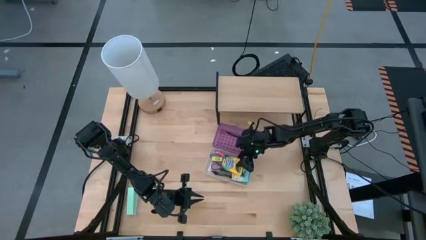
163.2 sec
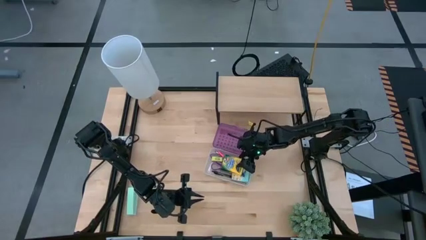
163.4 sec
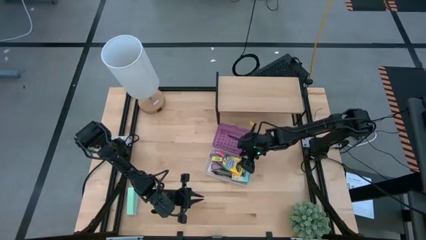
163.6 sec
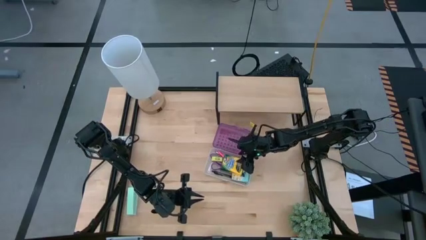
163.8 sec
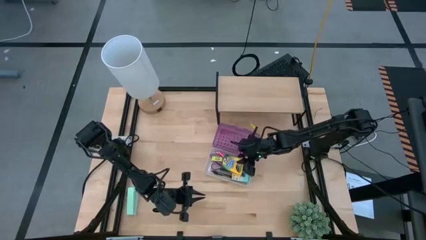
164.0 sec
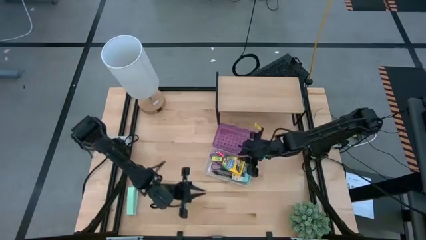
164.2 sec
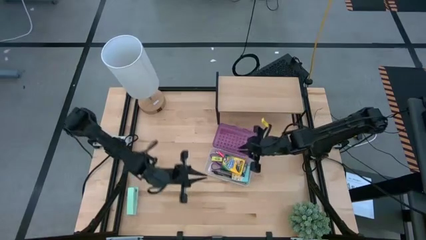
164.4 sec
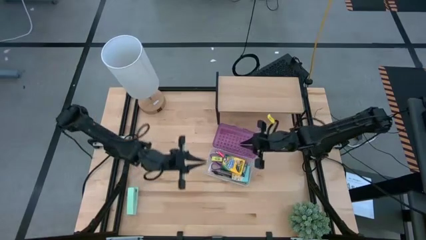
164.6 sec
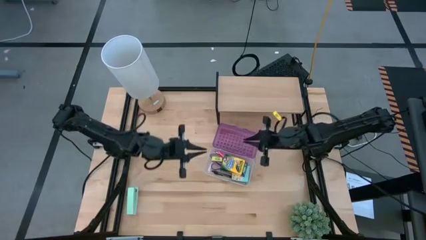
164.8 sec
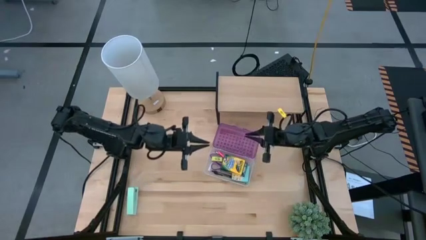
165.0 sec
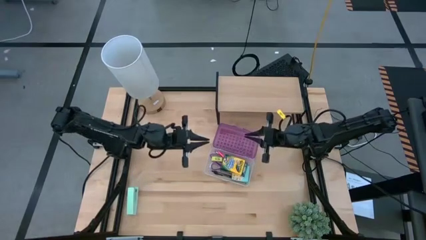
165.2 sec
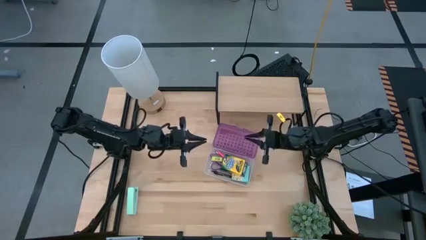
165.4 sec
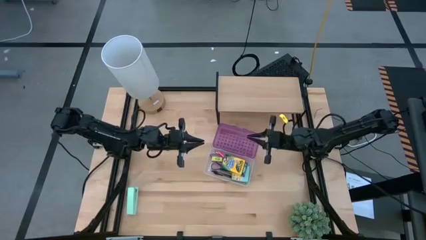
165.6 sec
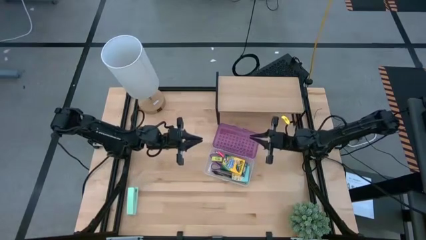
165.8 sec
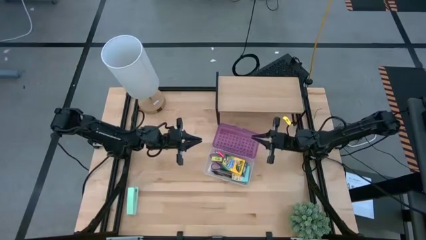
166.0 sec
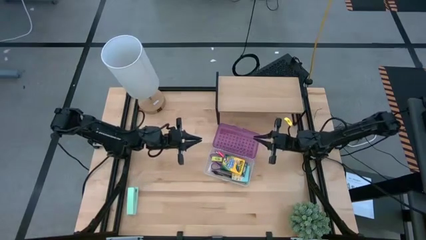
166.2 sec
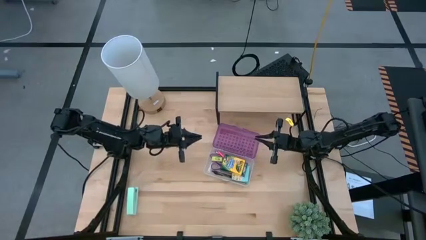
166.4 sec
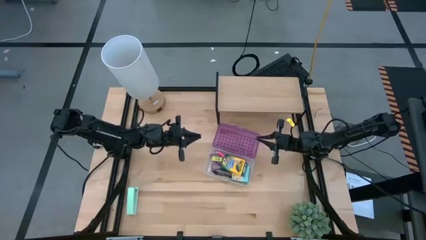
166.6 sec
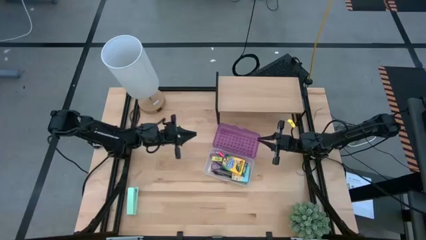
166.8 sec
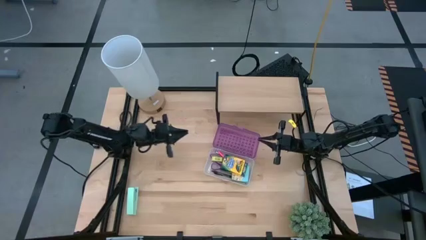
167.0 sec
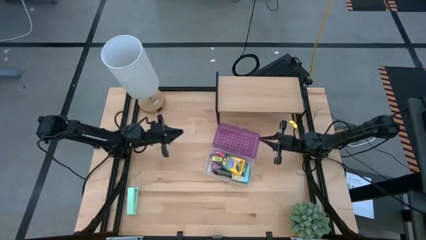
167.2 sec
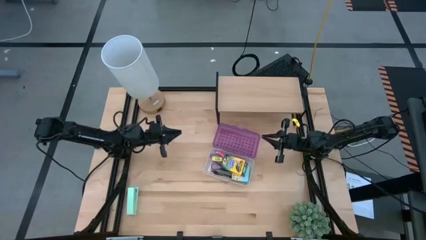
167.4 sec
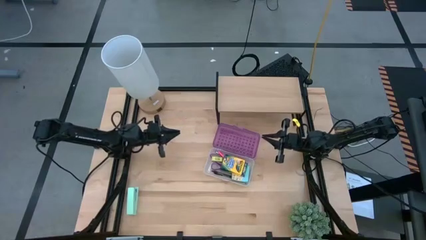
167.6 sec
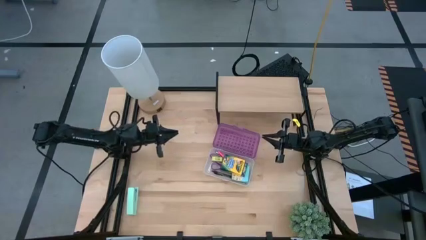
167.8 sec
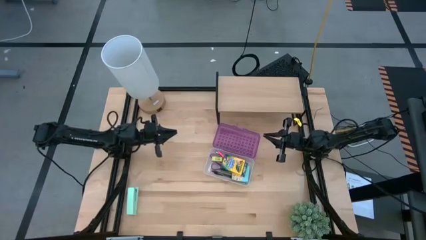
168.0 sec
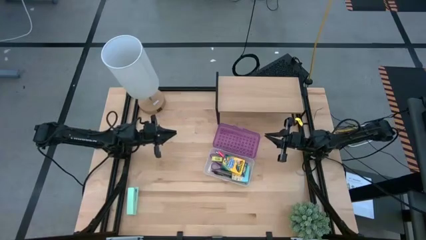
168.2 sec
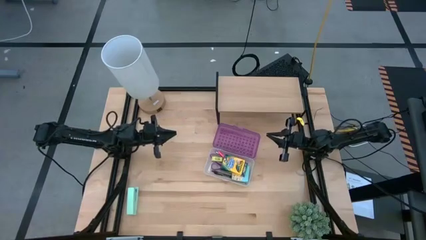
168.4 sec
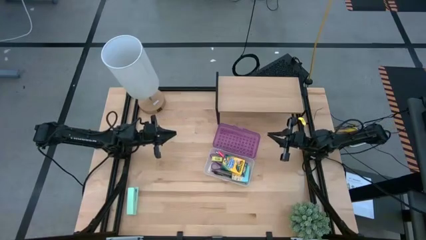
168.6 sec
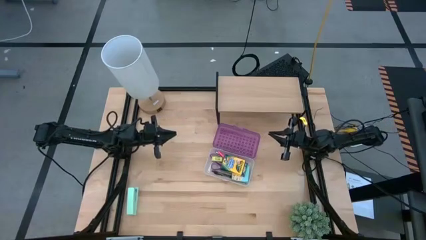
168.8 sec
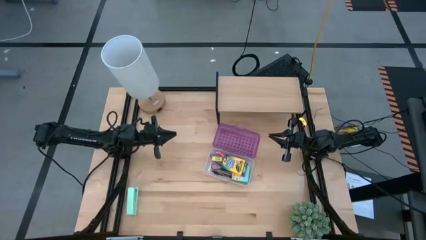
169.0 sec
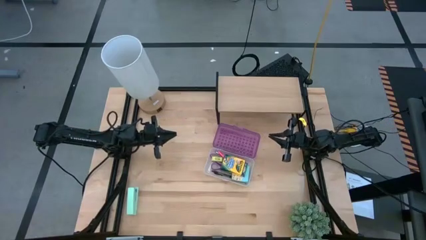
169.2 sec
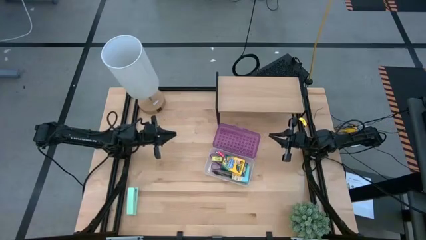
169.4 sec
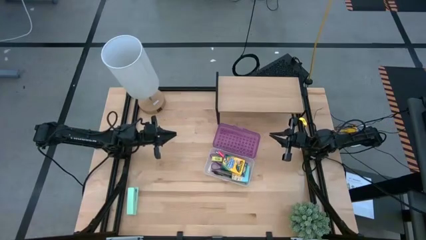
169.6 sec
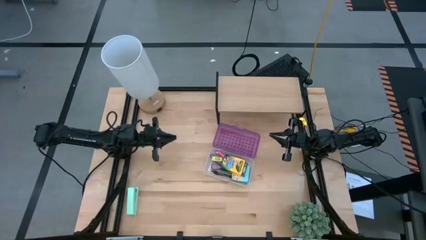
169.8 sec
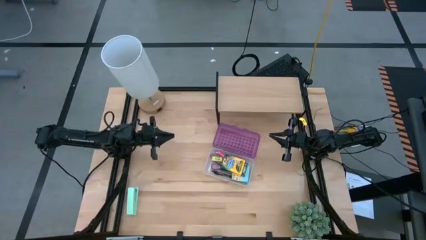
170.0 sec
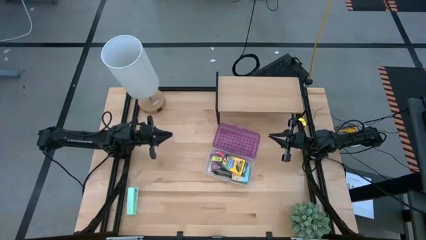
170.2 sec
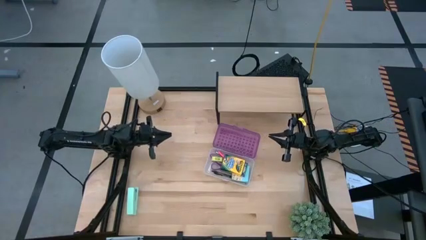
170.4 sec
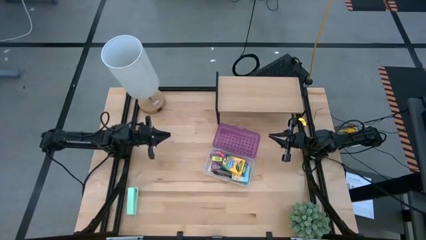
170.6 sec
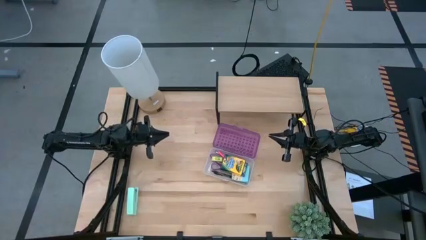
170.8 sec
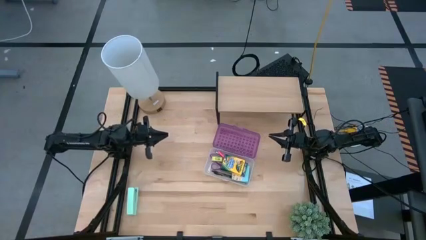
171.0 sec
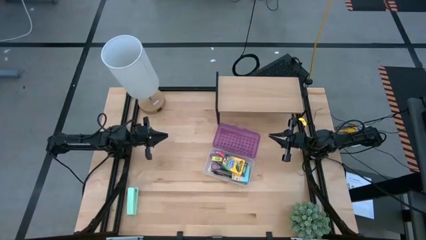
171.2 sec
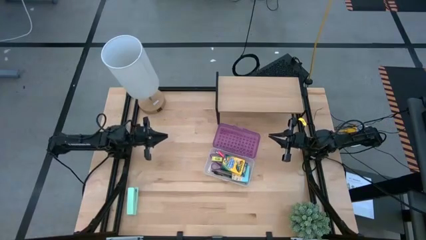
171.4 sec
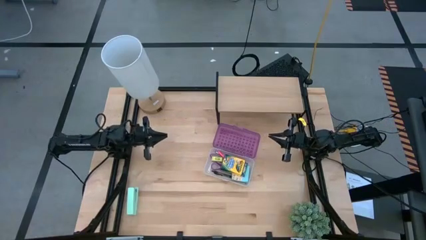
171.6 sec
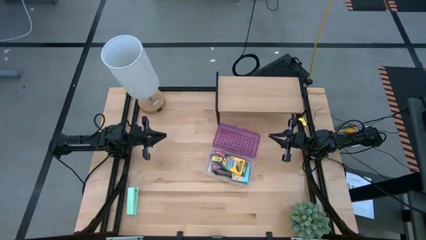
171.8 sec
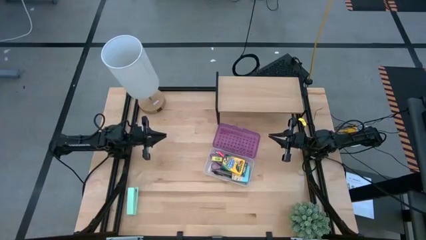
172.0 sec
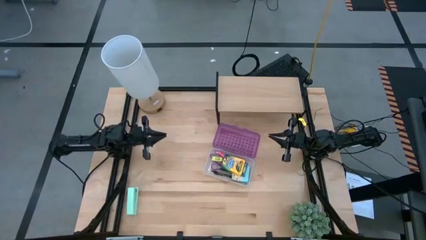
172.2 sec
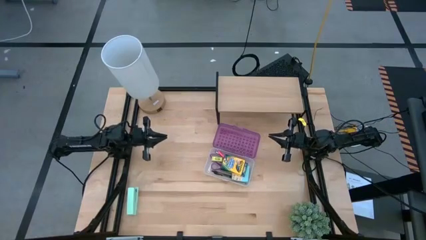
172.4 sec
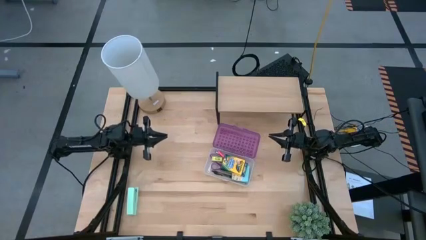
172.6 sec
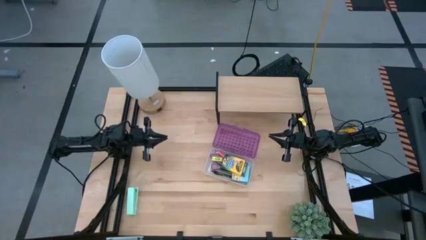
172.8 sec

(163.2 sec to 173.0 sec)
Task: Pack school essentials
Return to Home Position

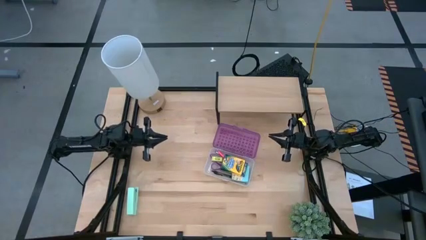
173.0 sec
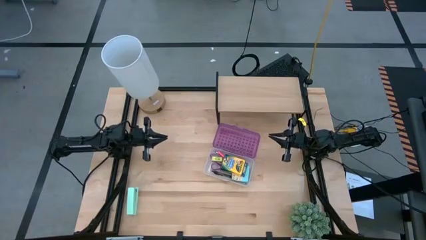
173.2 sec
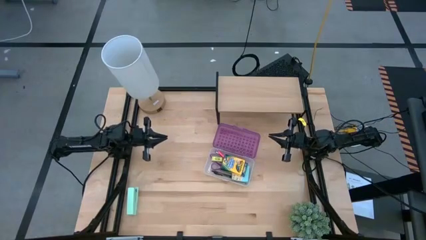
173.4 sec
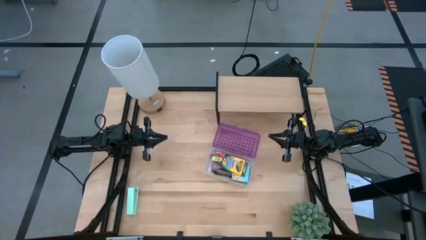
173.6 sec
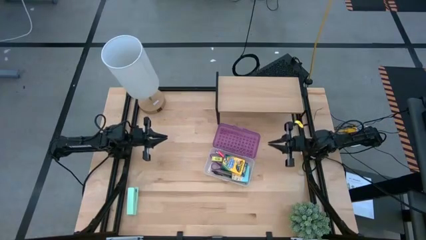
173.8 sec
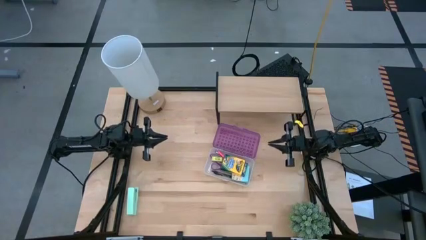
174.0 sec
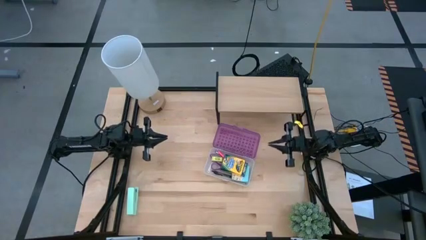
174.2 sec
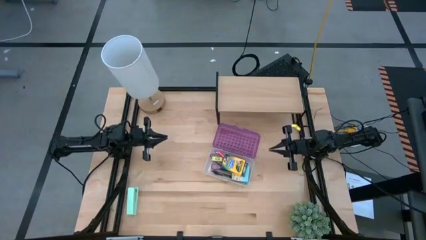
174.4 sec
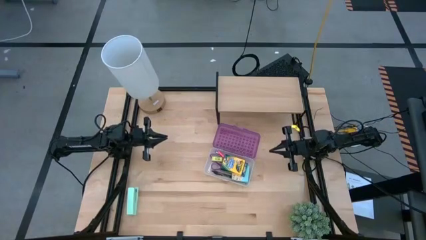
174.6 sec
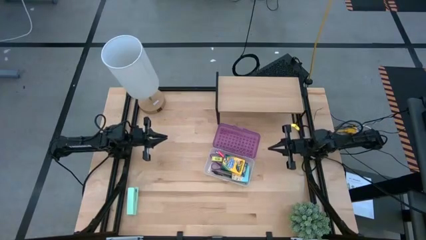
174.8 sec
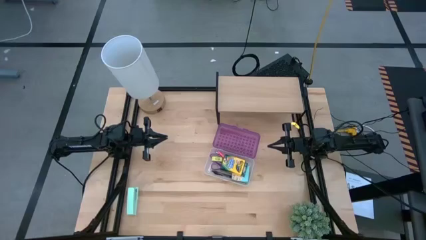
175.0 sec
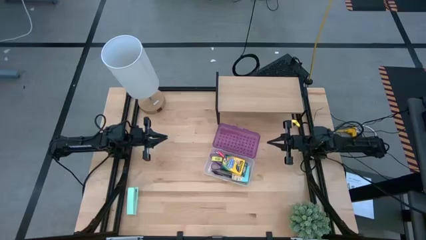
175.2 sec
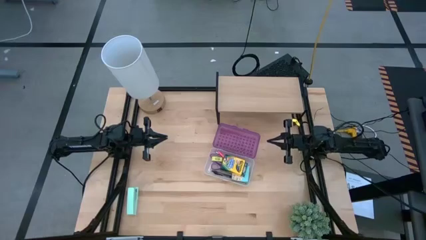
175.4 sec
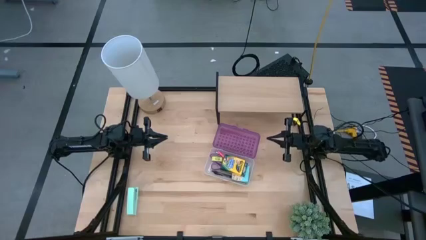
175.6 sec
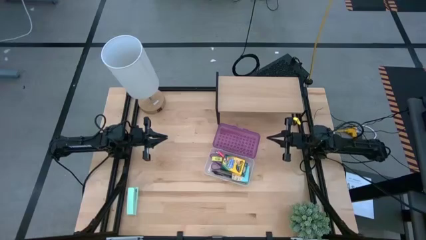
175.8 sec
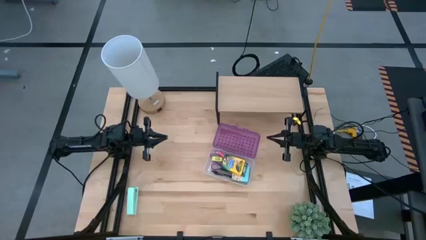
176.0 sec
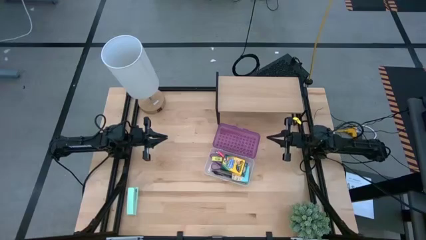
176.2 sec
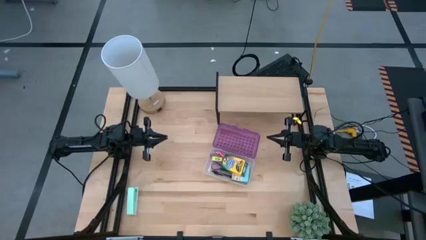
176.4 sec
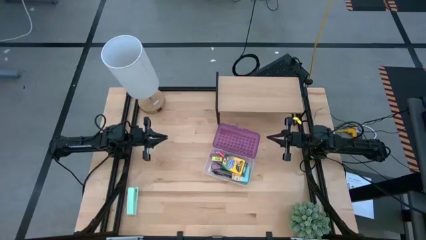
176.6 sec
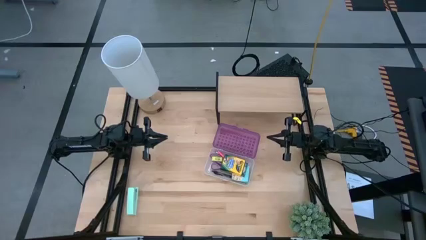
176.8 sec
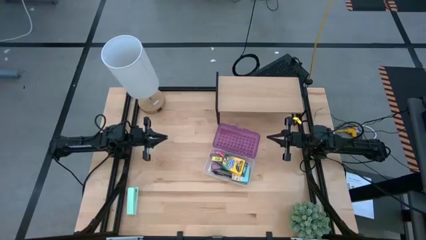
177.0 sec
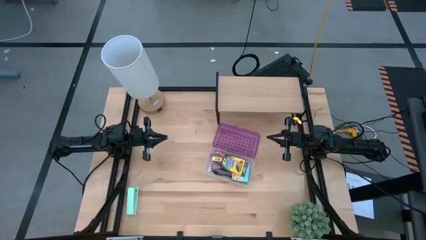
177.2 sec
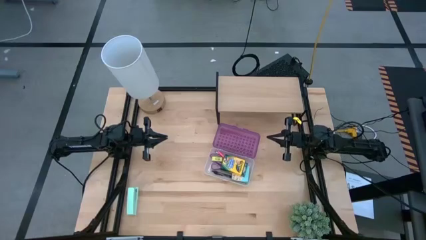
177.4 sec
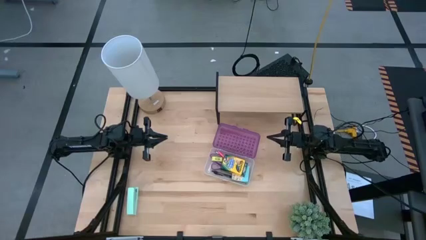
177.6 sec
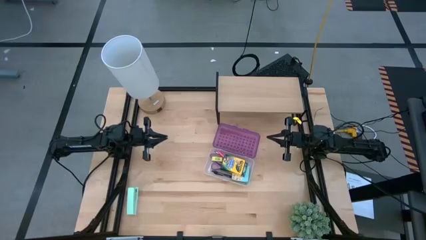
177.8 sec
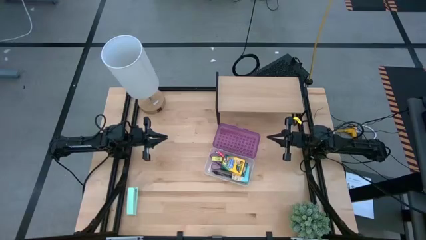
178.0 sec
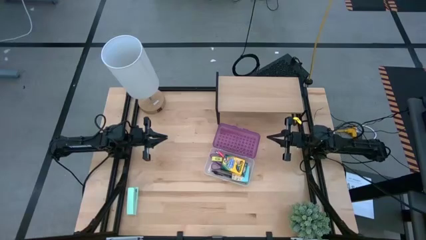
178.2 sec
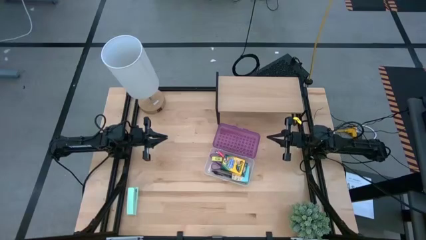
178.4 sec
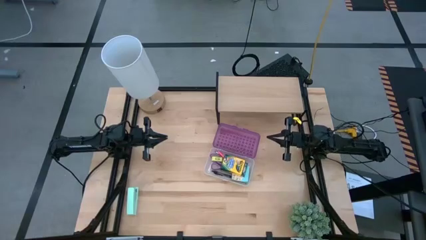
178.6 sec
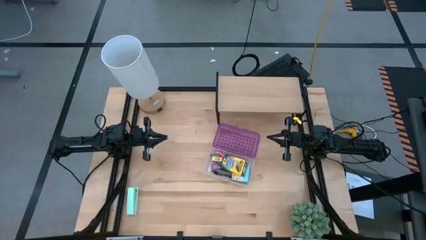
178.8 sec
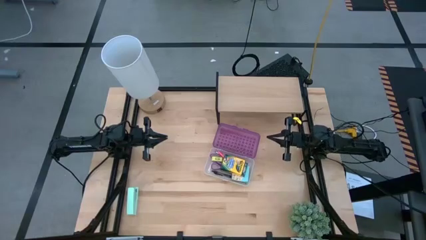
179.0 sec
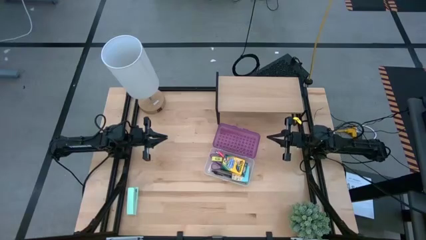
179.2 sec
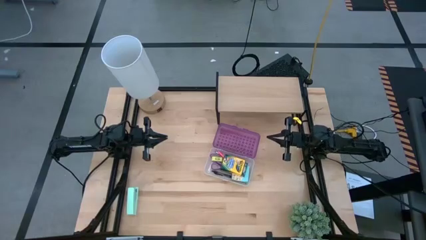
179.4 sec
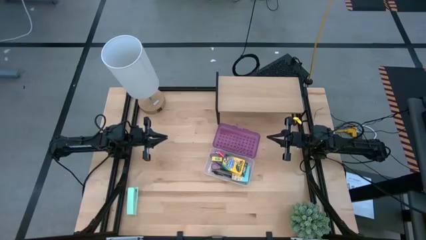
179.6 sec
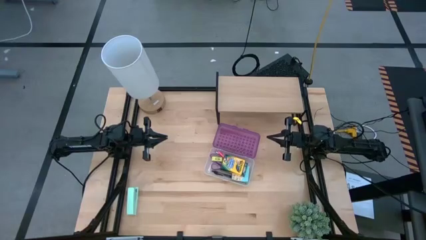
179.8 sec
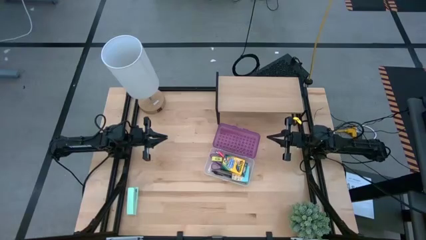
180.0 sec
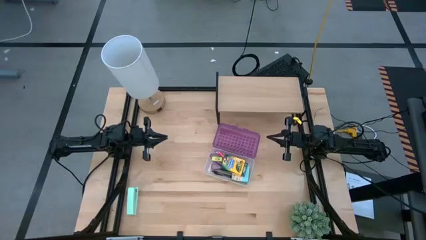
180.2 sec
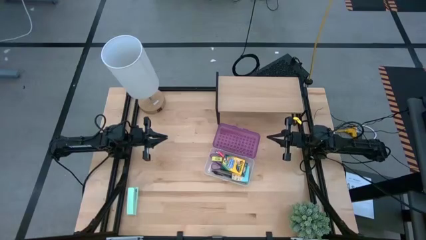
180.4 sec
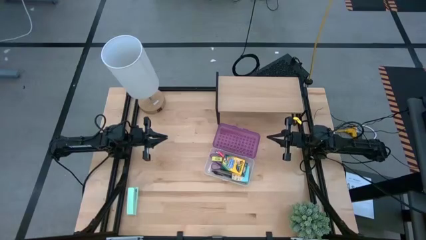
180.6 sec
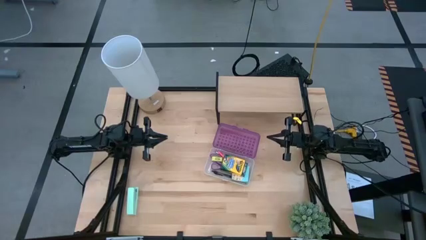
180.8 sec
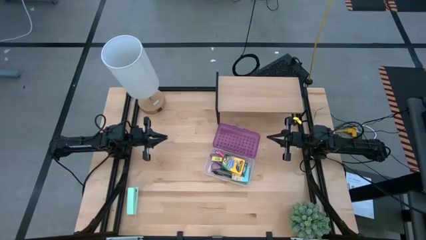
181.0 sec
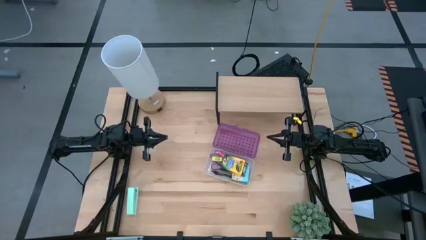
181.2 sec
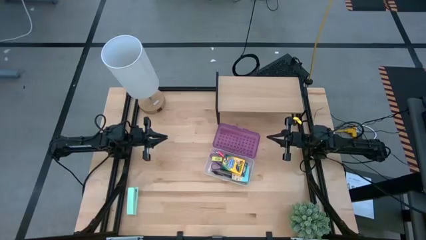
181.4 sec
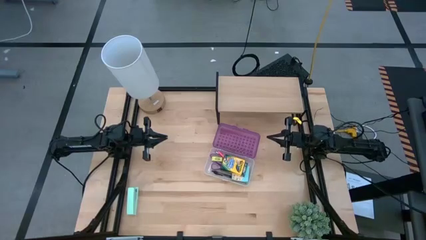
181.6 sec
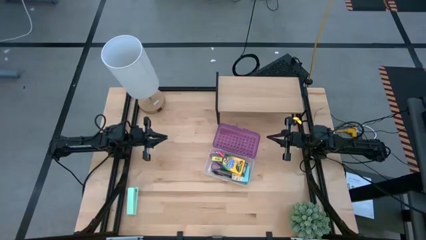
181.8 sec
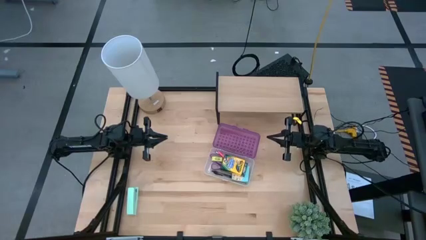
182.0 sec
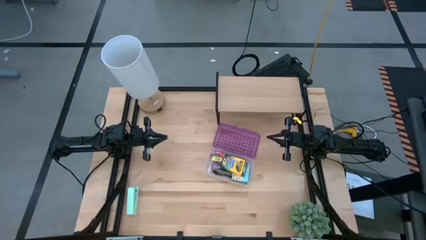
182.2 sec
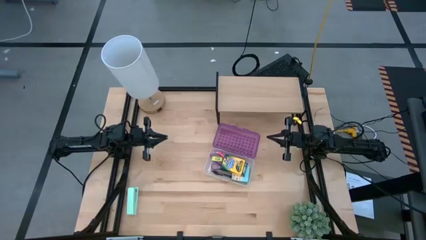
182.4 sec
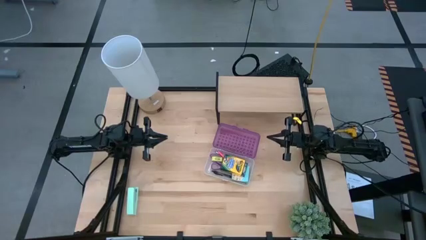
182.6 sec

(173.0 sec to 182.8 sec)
Return to Home Position
